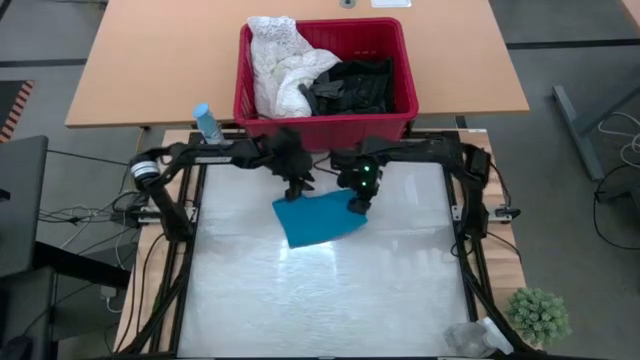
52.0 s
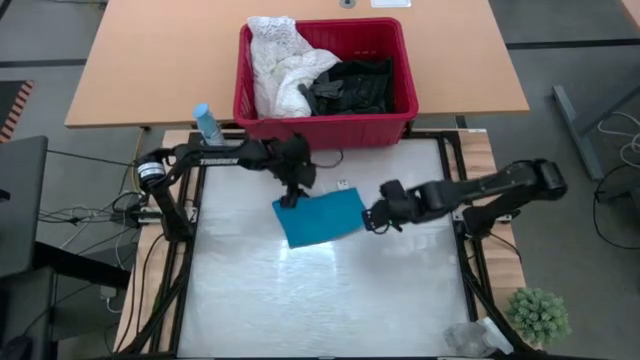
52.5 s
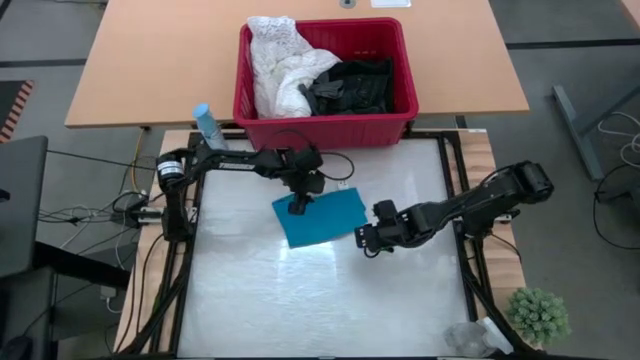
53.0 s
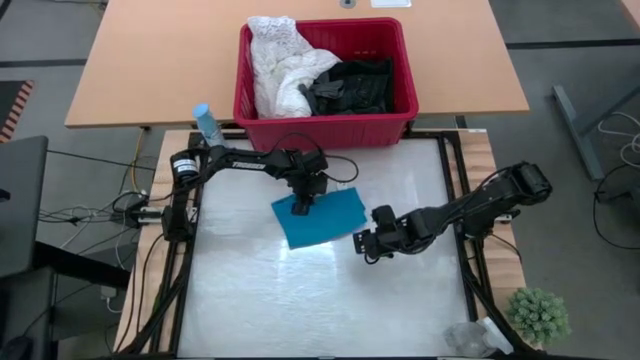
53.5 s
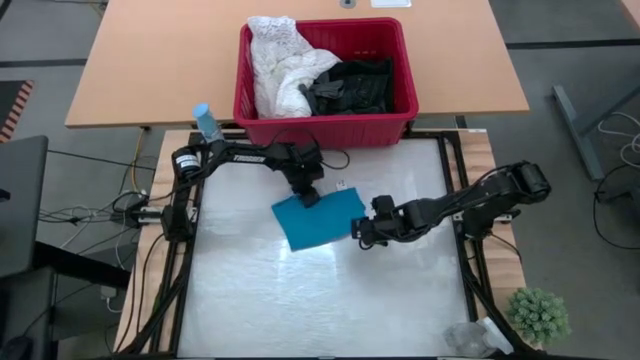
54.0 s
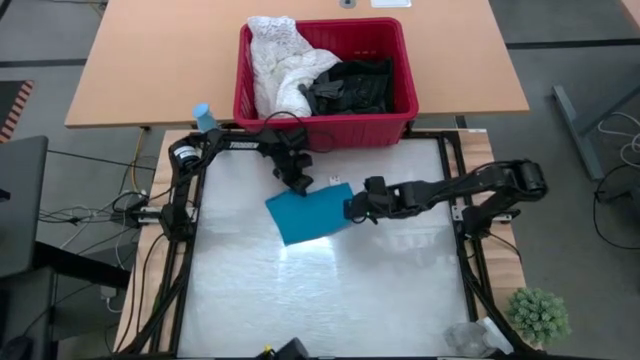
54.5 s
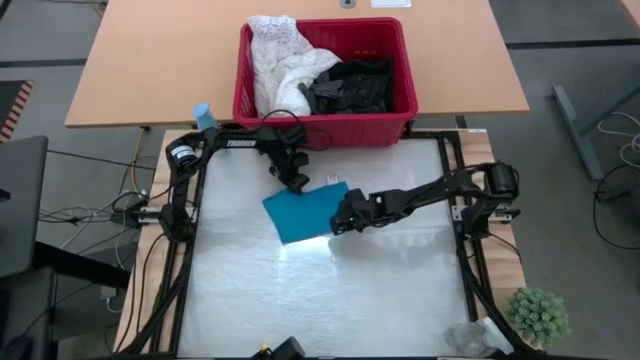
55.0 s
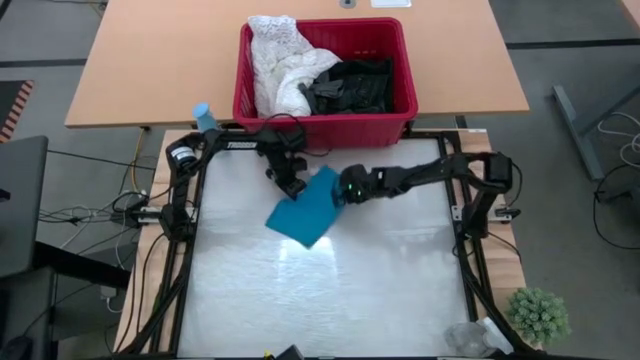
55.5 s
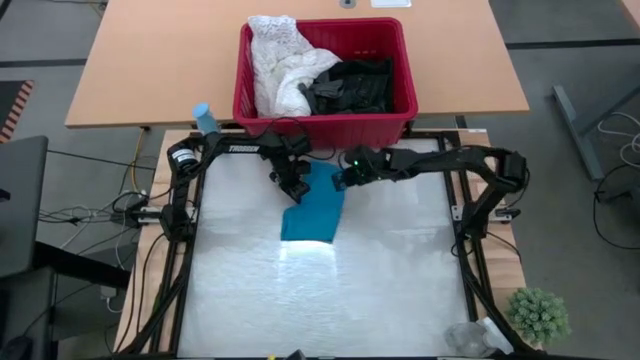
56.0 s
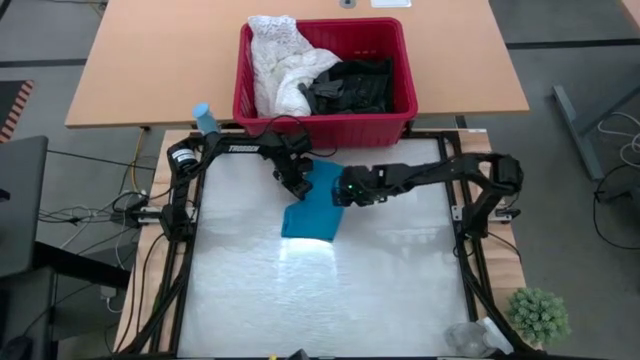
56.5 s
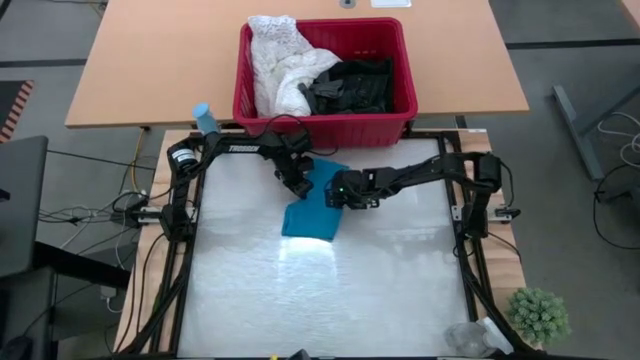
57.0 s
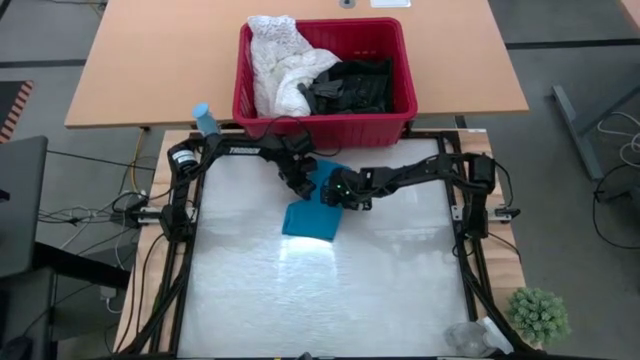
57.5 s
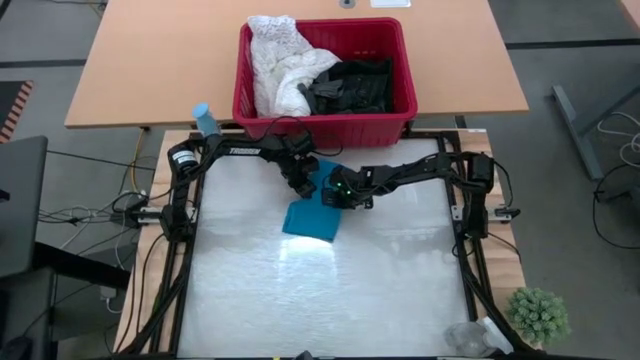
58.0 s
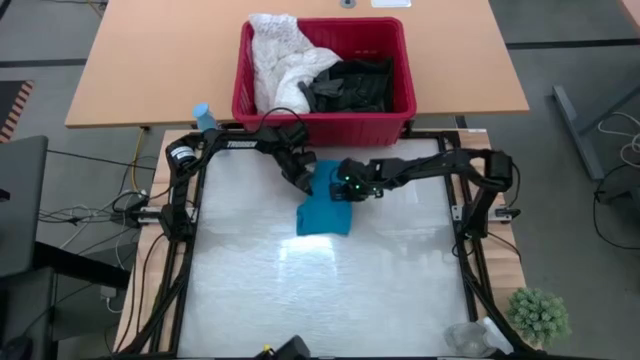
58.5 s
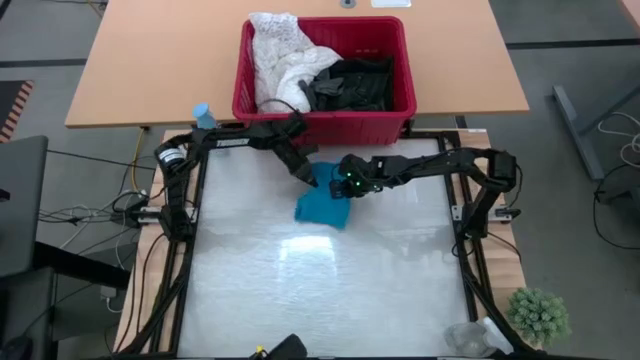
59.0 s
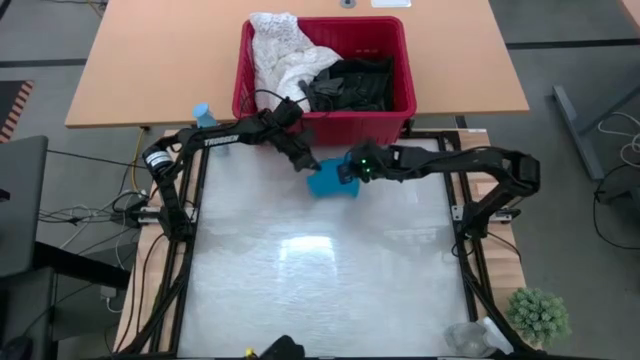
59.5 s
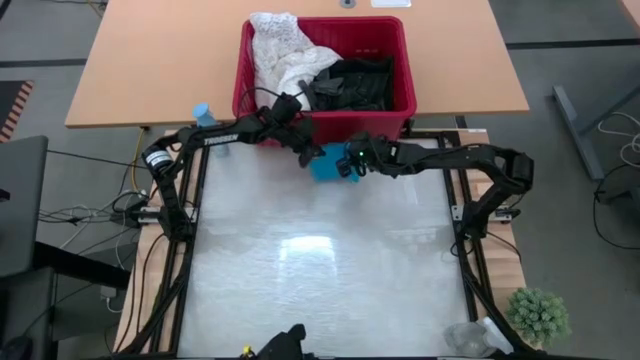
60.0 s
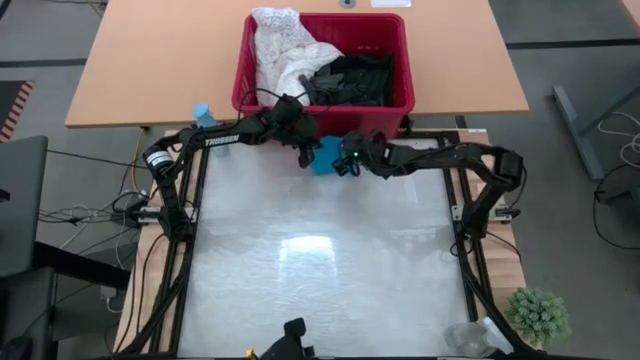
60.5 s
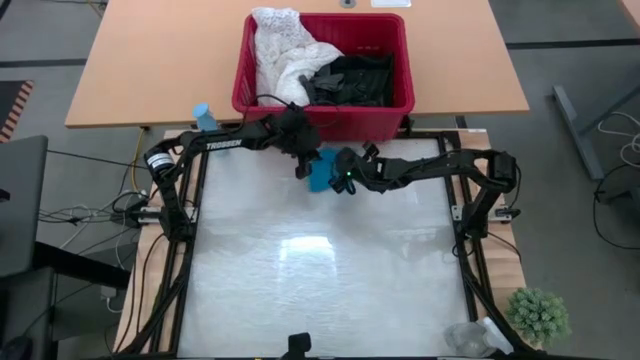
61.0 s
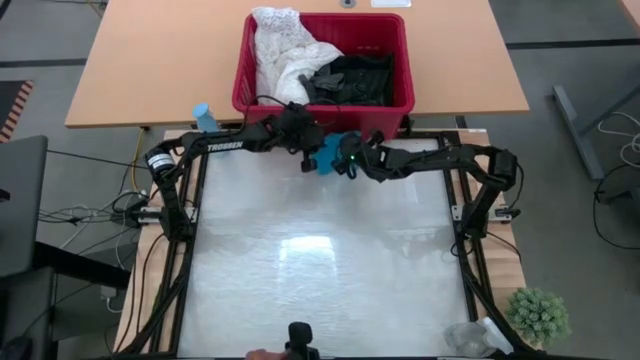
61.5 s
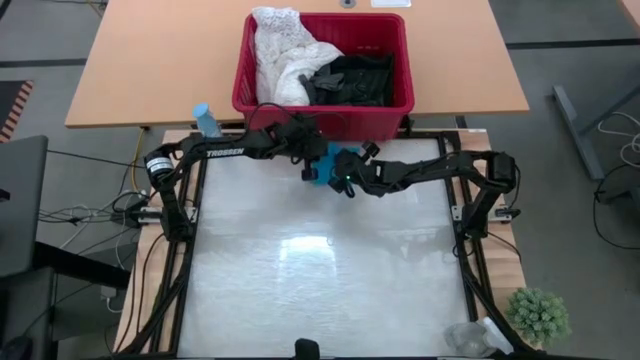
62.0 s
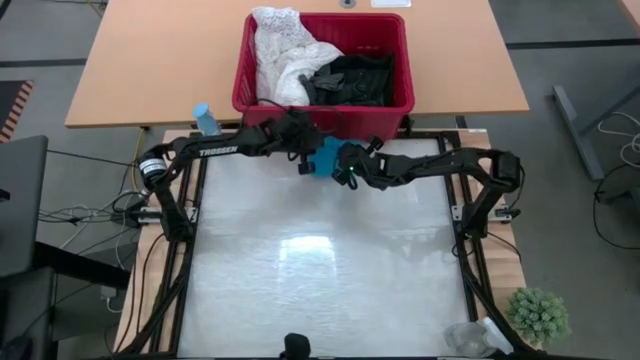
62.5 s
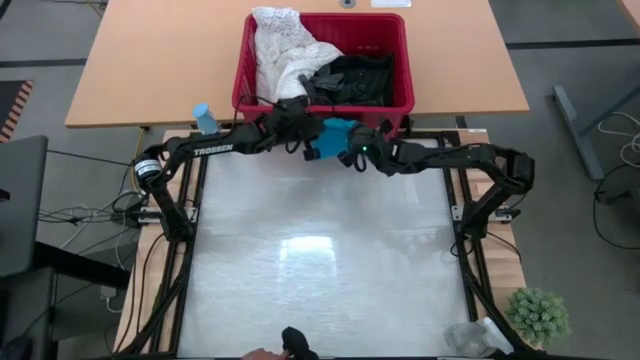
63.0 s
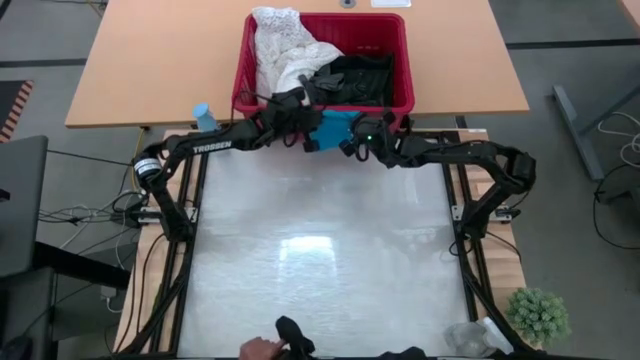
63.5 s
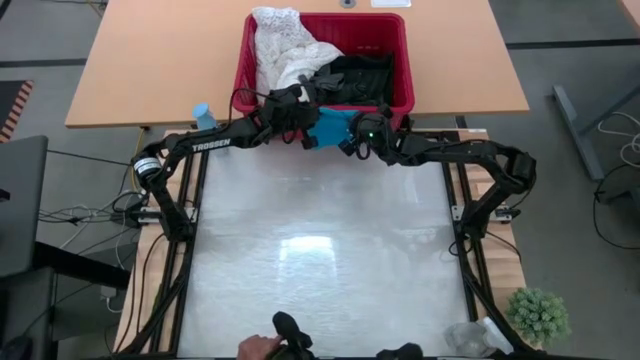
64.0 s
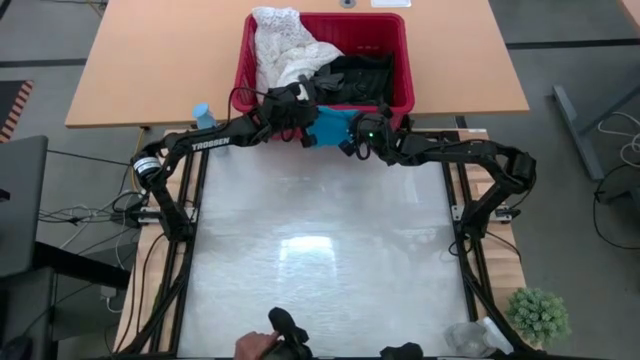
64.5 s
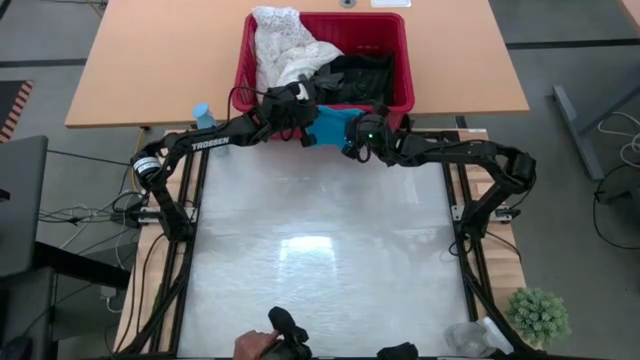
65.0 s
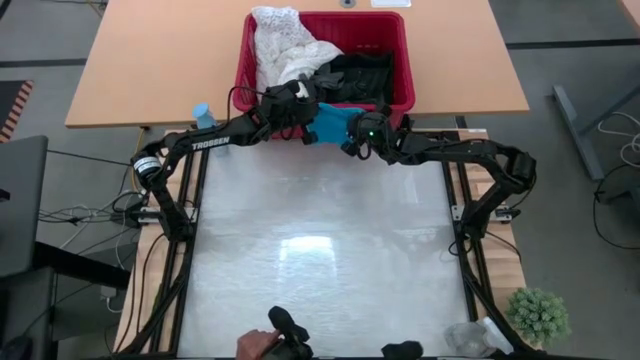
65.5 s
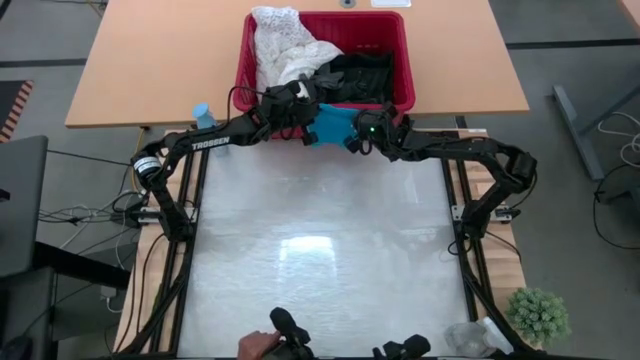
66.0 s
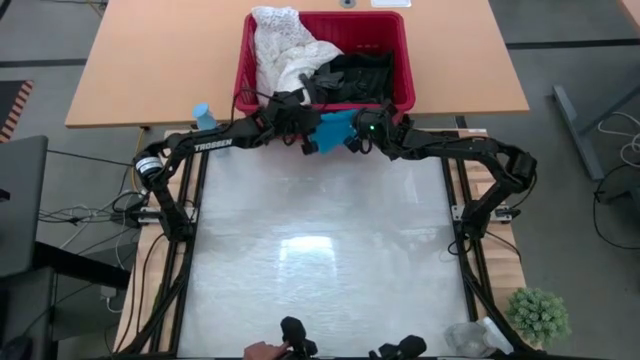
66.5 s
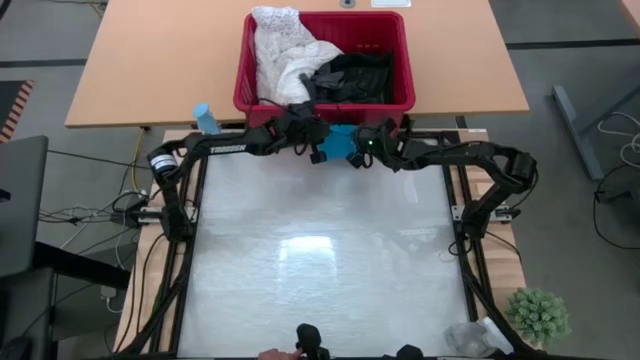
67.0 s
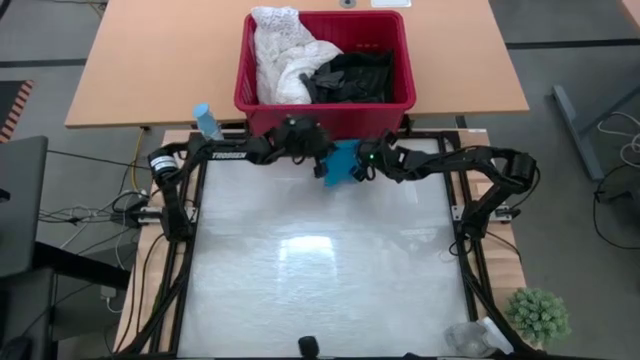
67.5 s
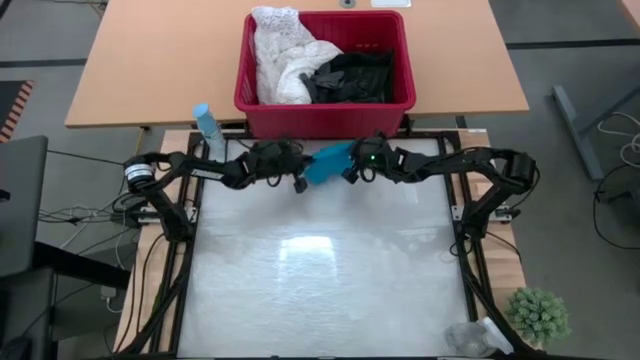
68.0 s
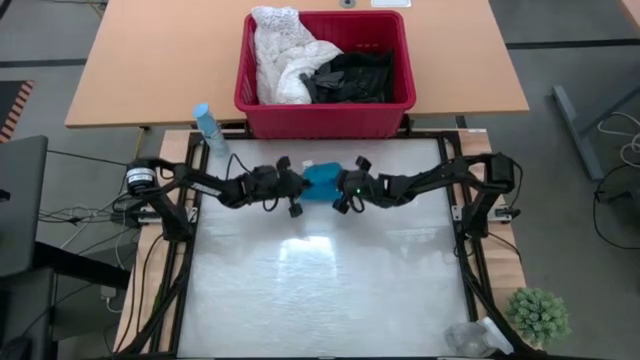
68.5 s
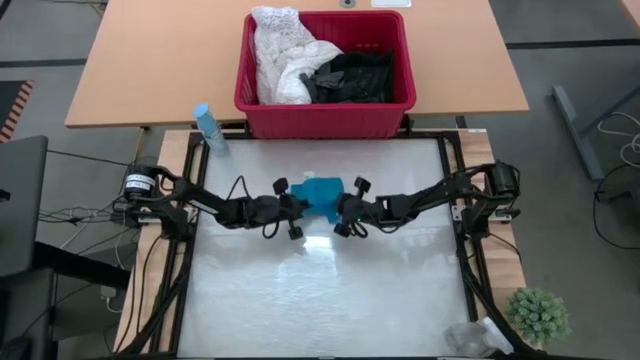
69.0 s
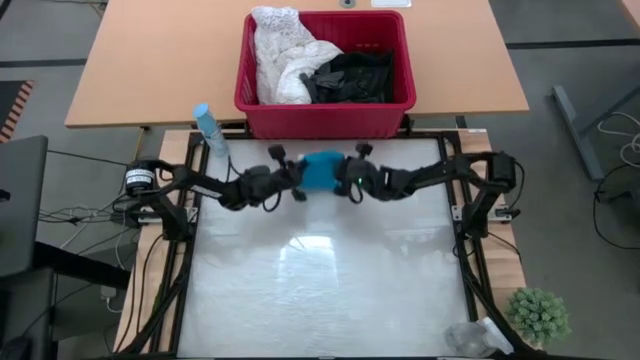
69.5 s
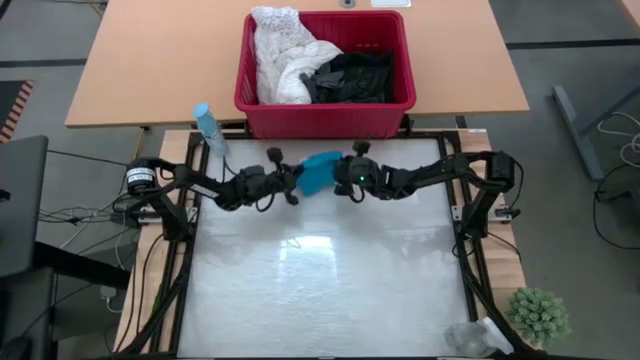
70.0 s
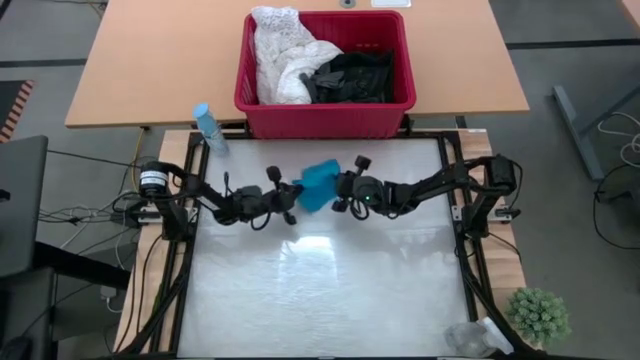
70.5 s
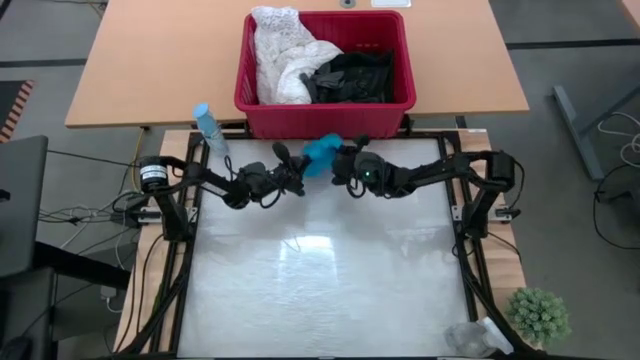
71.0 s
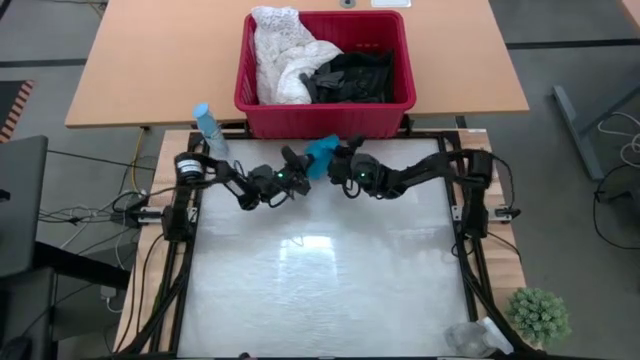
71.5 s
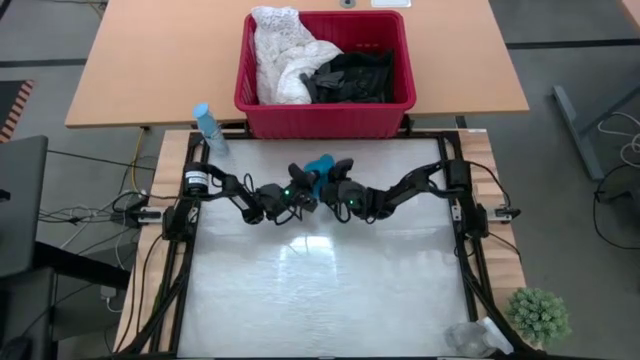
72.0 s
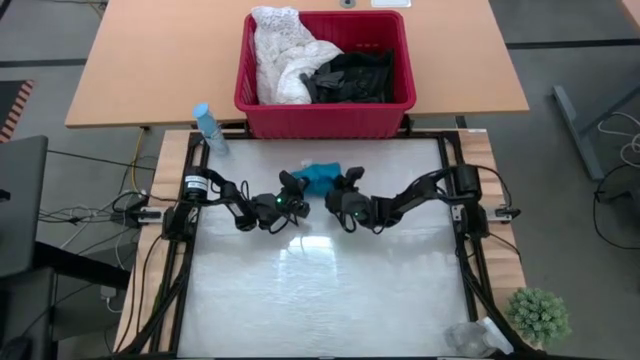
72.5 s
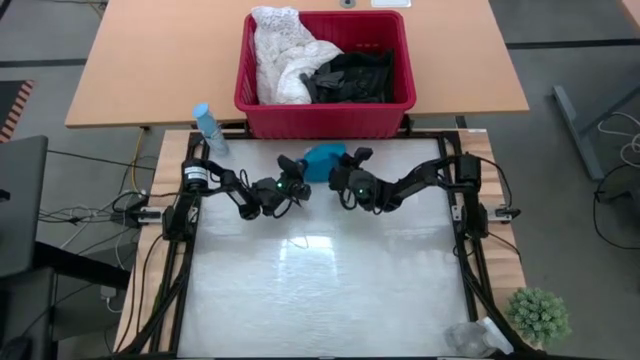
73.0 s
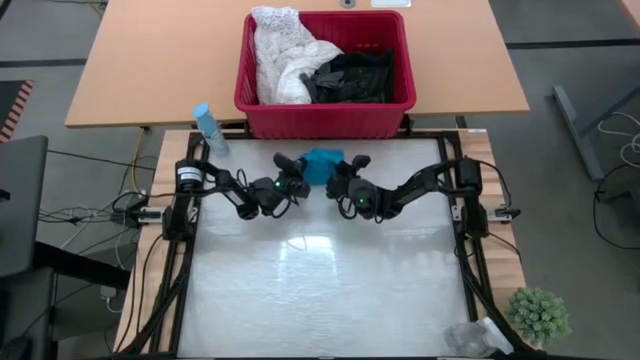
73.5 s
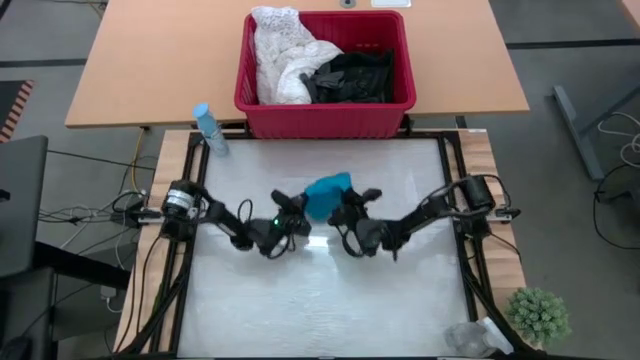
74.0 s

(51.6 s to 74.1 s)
Task: Fold laundry
Fold the blue shorts
